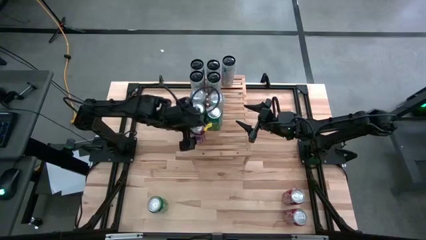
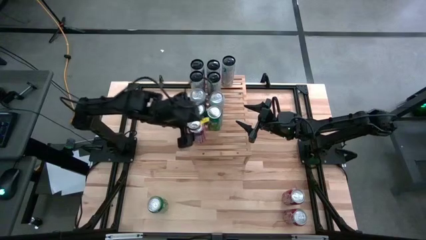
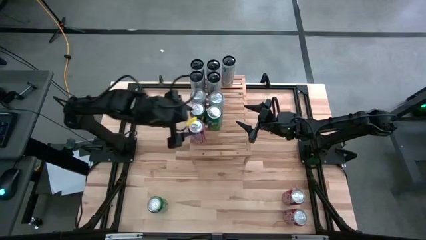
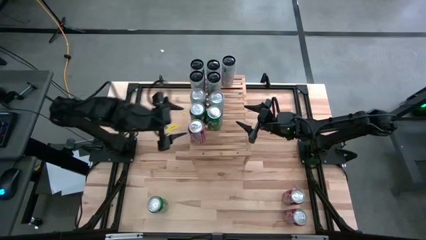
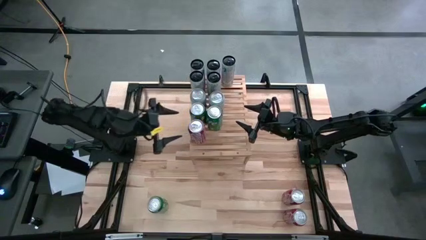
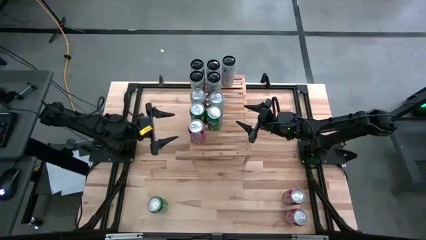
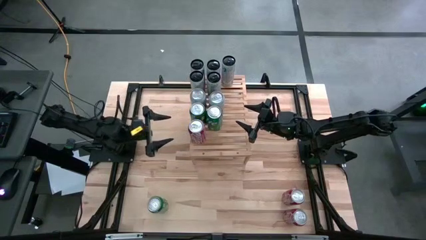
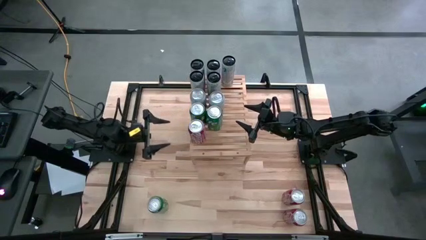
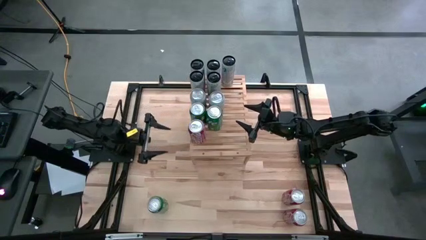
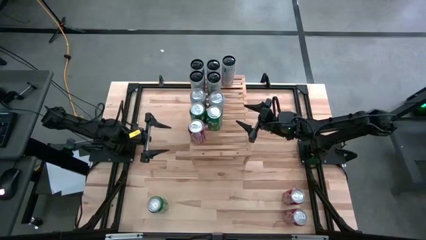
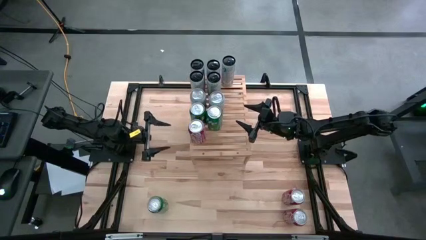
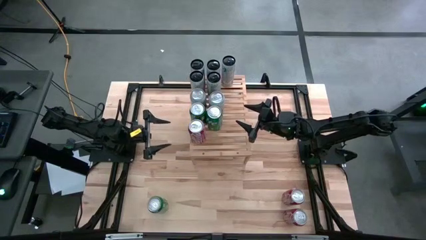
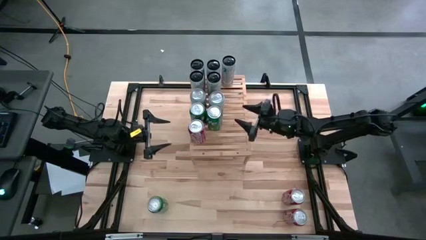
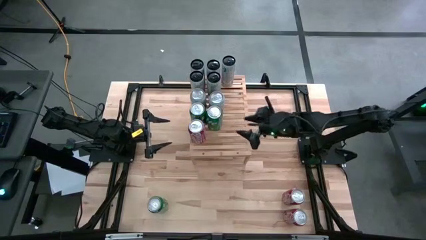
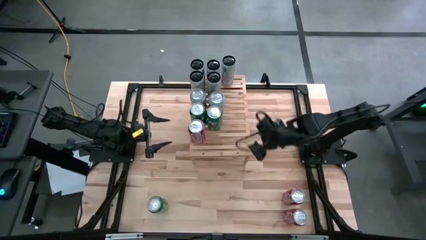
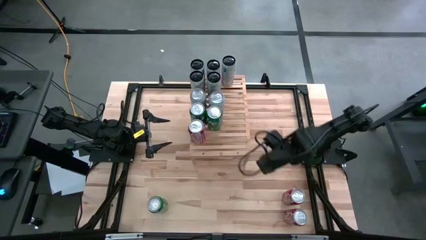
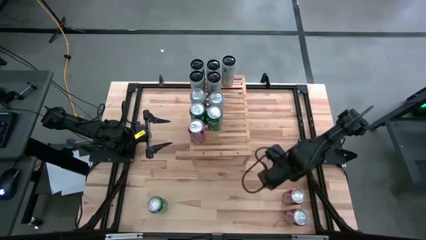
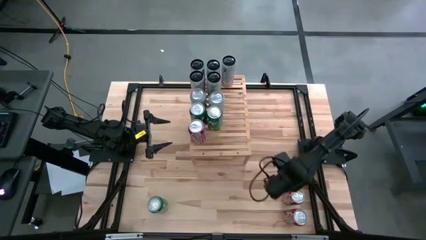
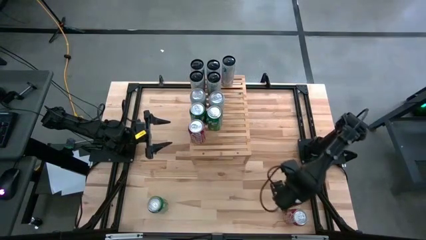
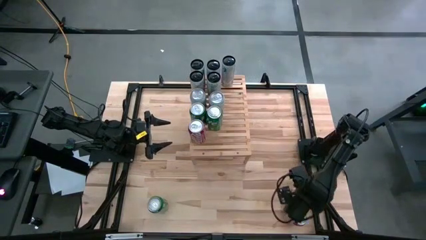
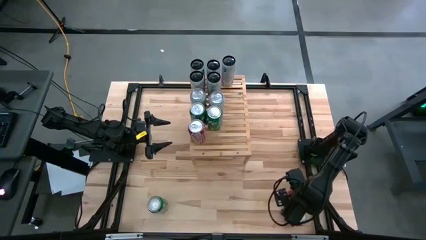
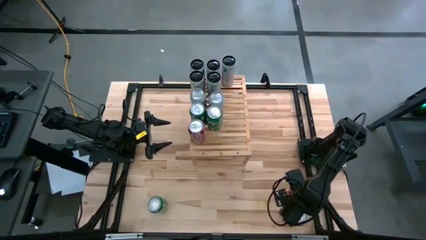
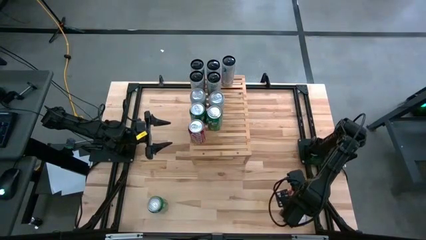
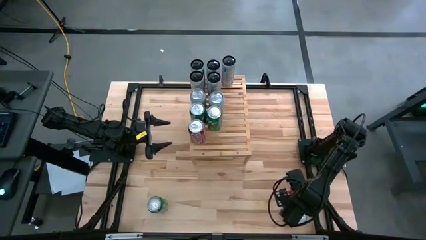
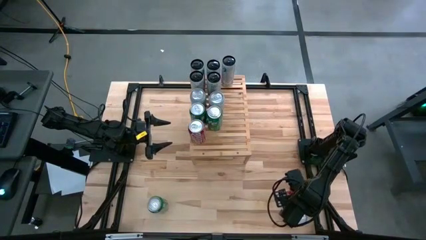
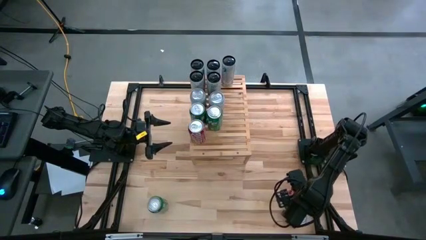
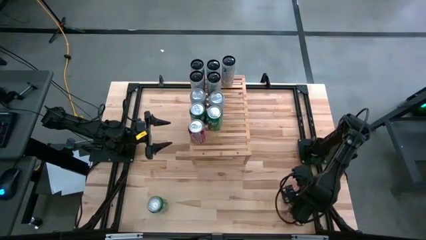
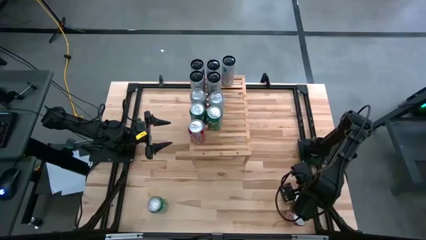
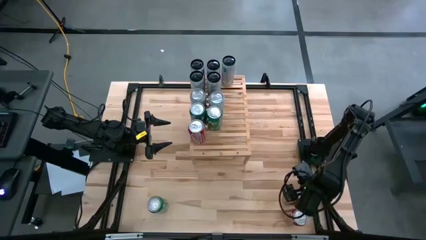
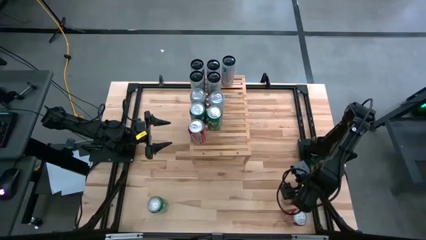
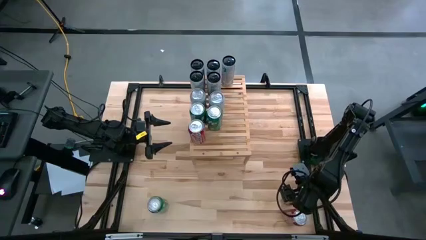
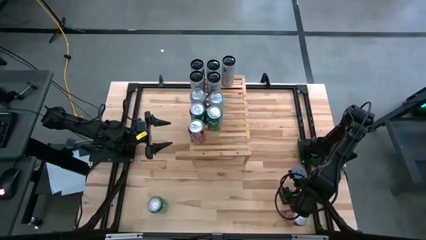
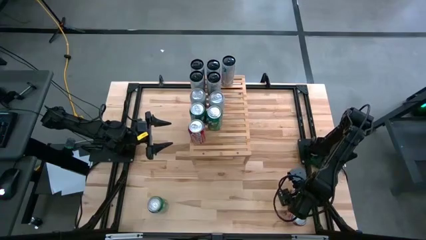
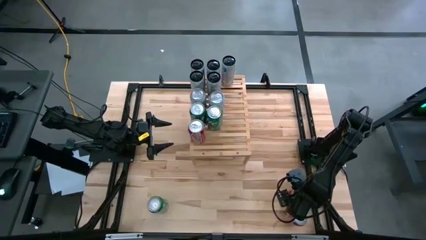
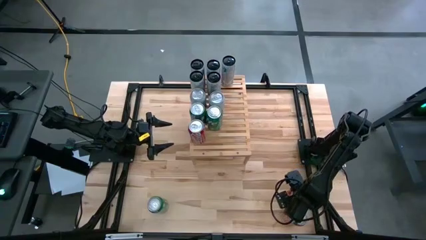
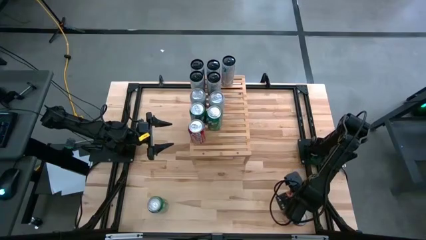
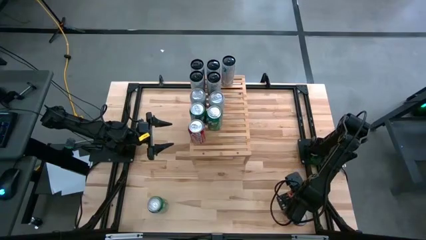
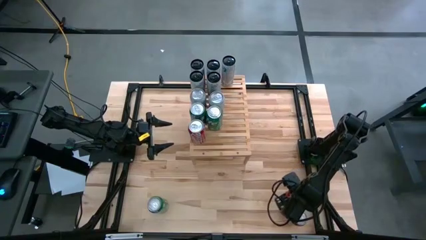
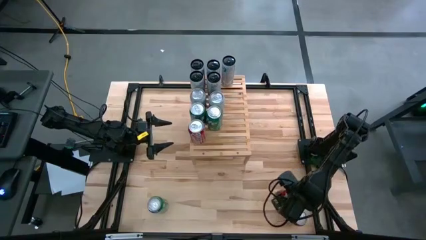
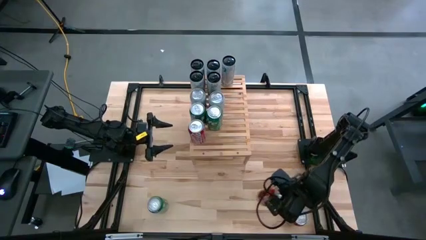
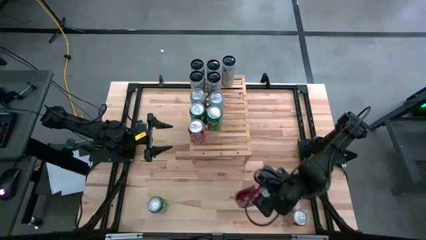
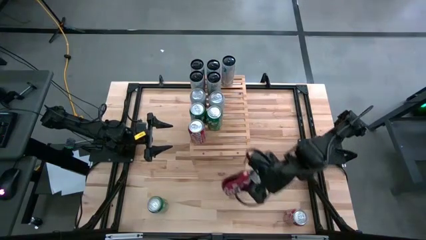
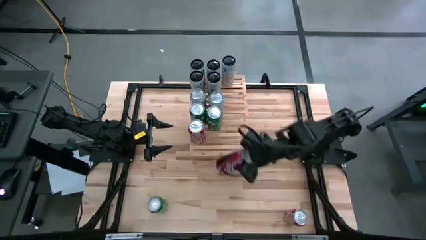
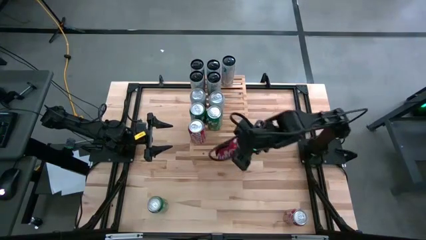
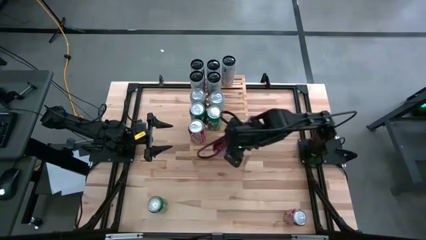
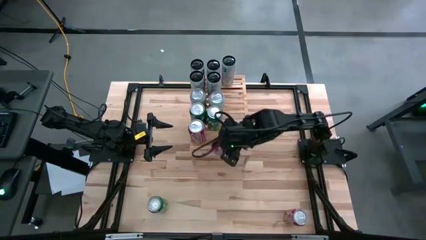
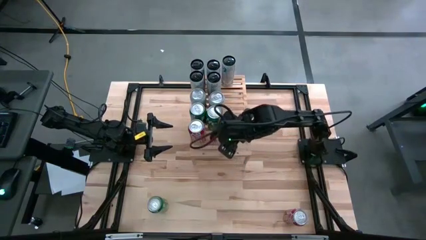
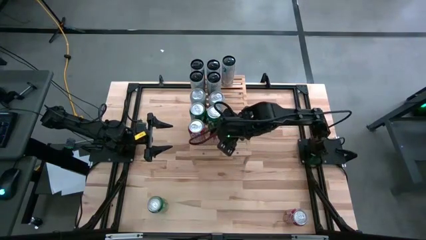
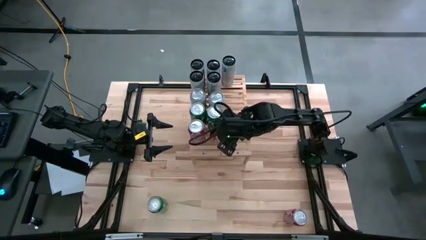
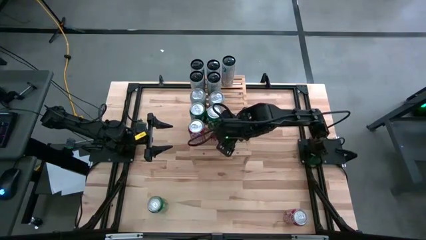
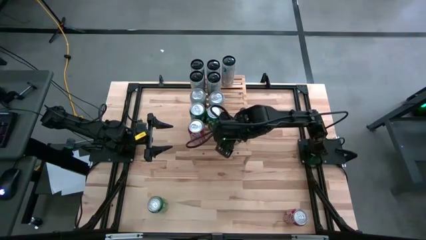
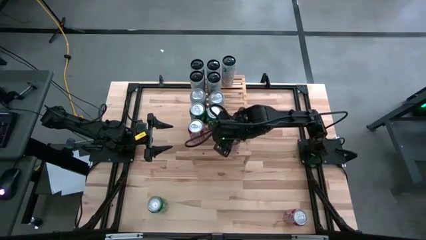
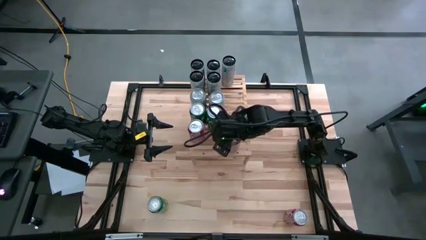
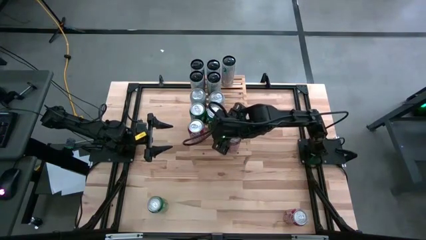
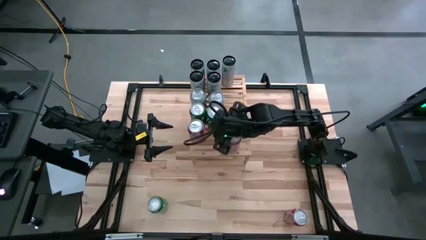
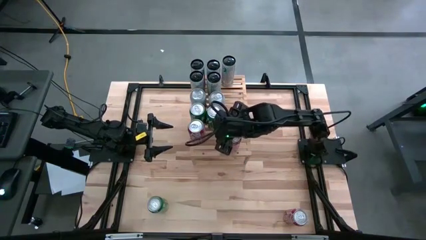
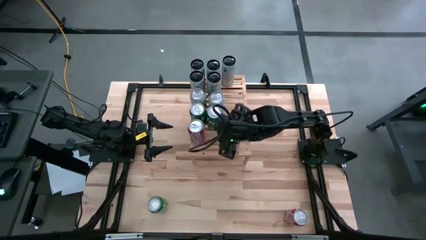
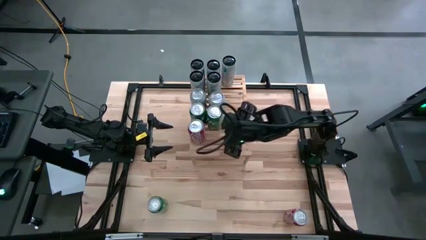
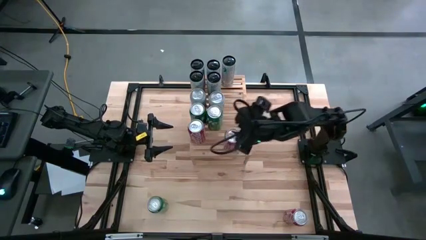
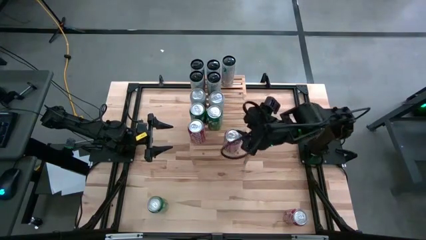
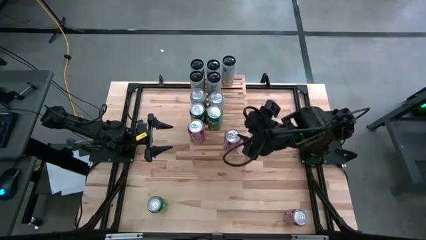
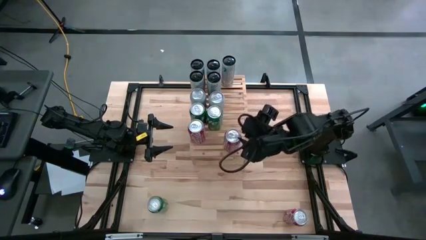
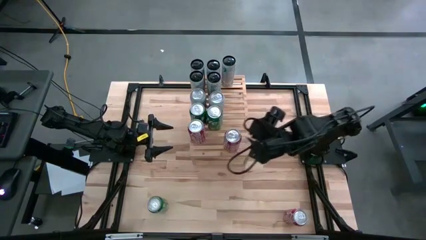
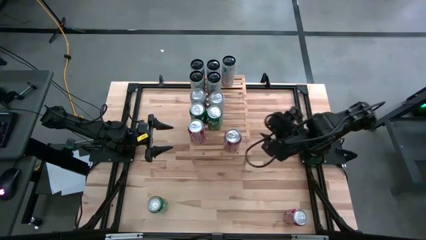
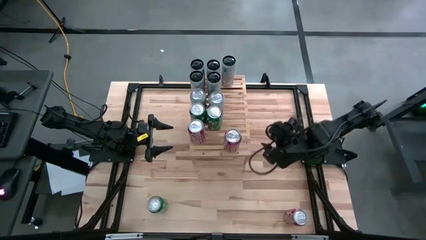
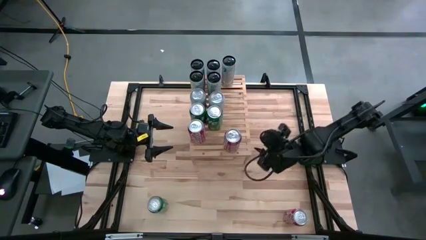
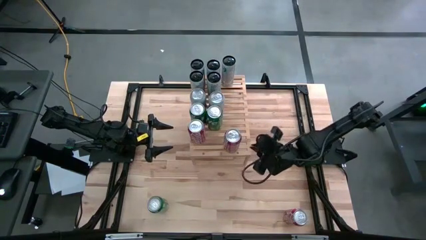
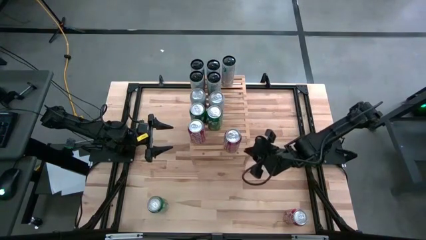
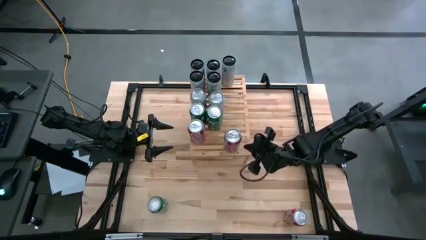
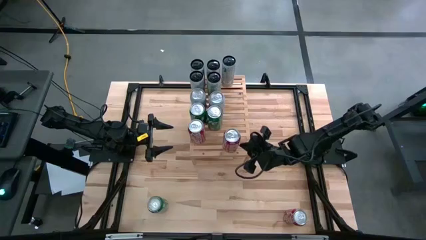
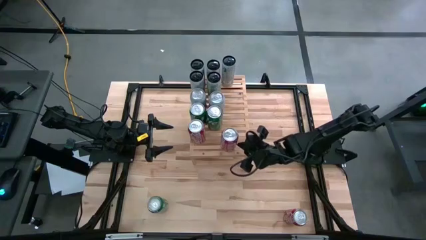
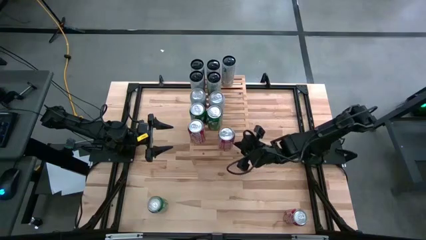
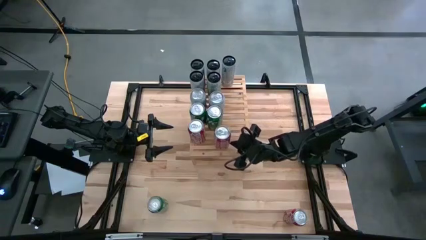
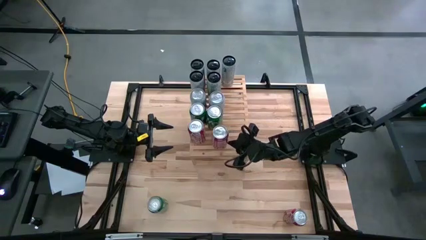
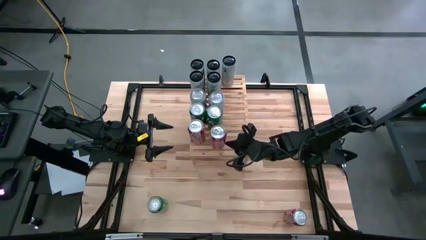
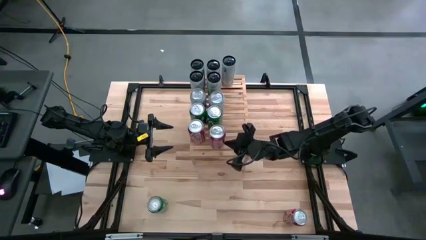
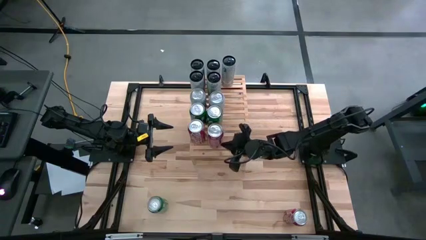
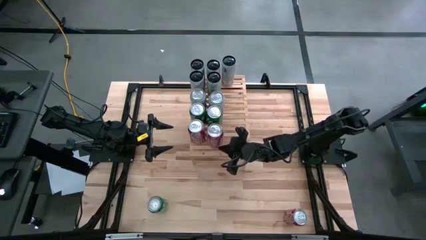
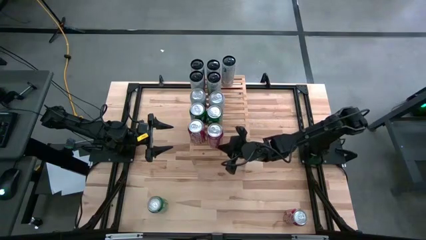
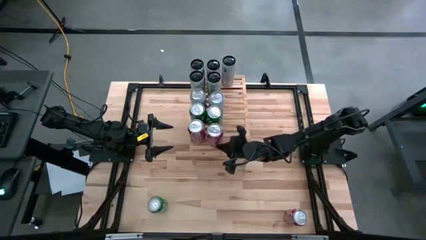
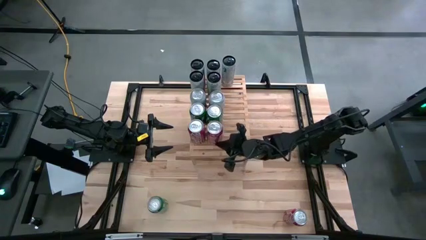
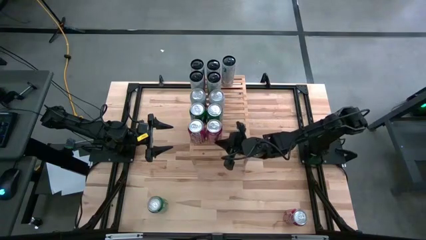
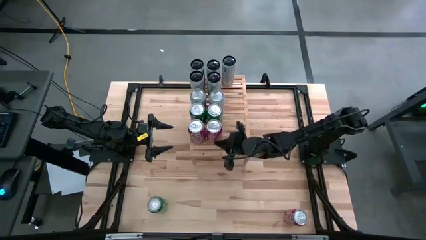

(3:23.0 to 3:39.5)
Task: Place canned beverage on shelf
Put the top red soda can aligned with the other red soda can on the shelf
